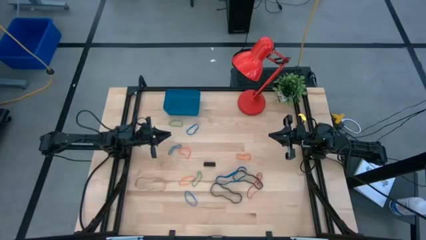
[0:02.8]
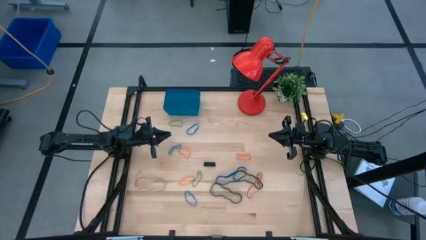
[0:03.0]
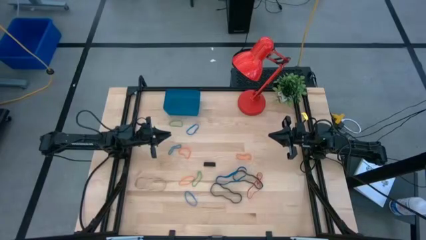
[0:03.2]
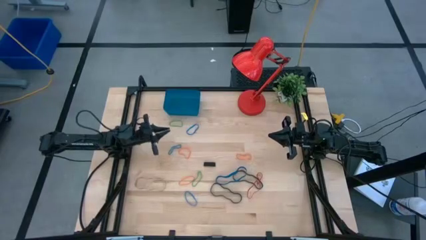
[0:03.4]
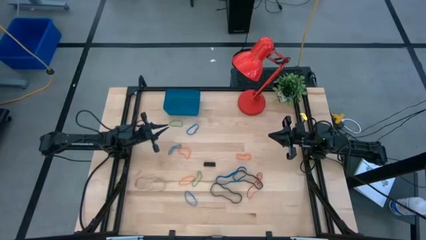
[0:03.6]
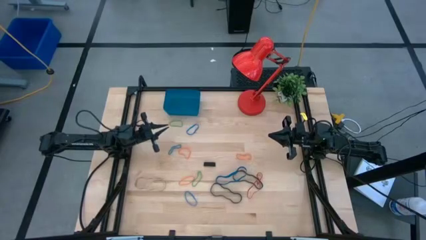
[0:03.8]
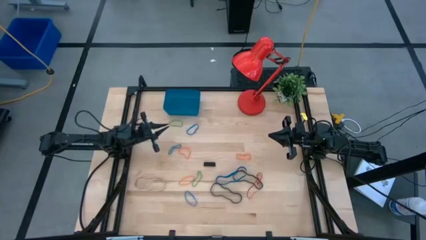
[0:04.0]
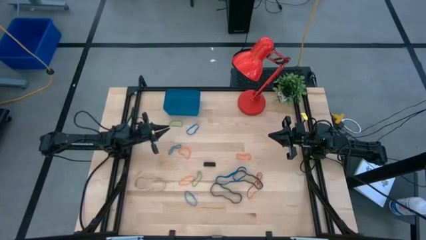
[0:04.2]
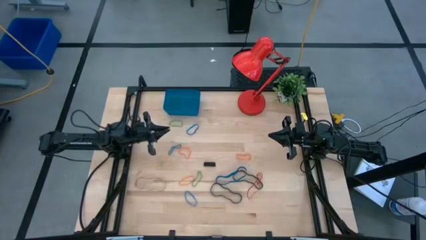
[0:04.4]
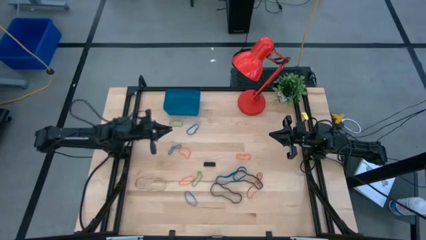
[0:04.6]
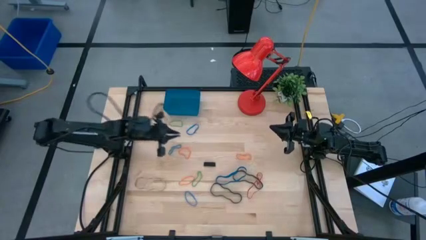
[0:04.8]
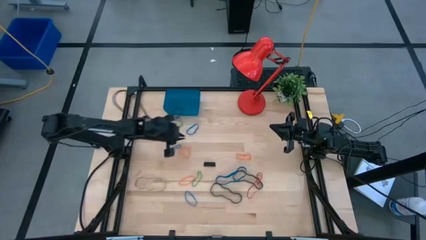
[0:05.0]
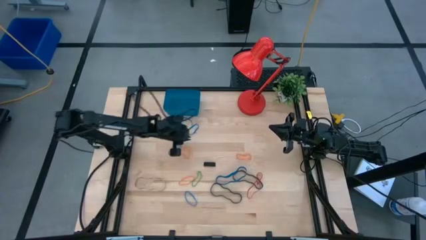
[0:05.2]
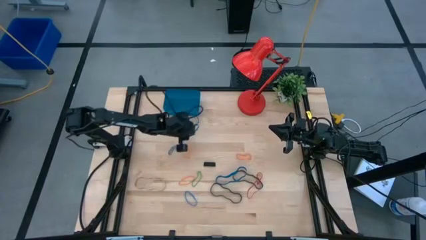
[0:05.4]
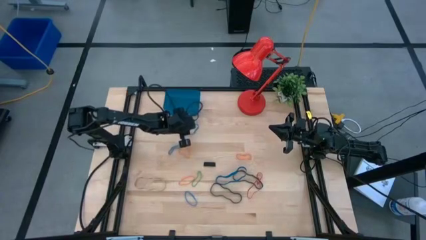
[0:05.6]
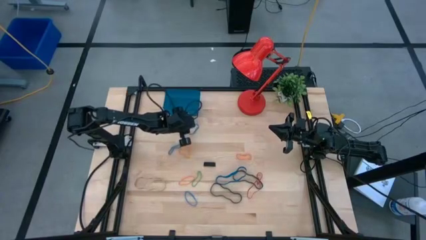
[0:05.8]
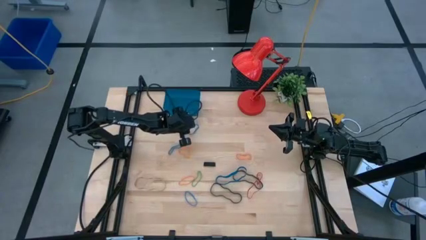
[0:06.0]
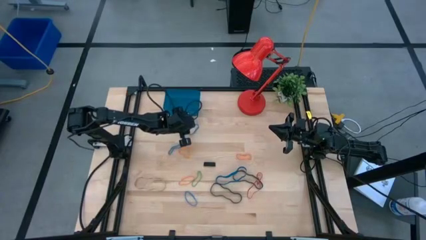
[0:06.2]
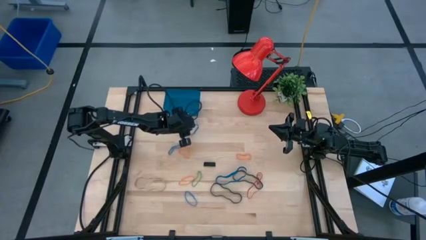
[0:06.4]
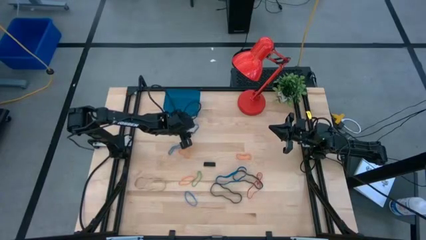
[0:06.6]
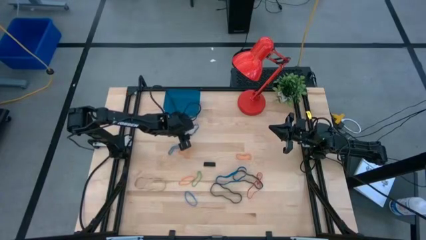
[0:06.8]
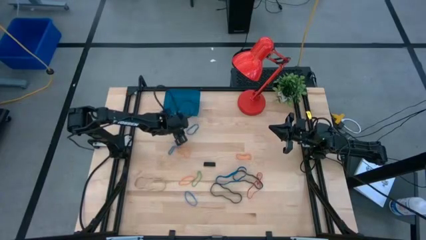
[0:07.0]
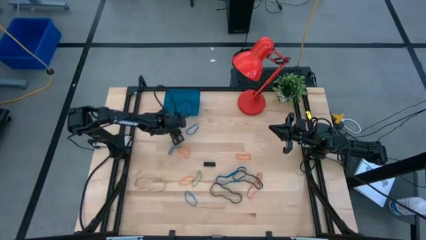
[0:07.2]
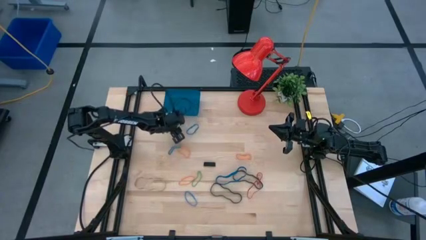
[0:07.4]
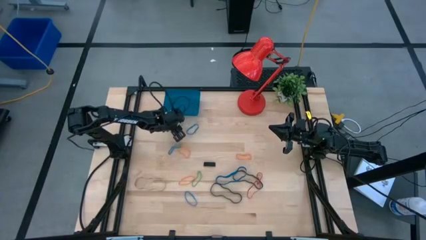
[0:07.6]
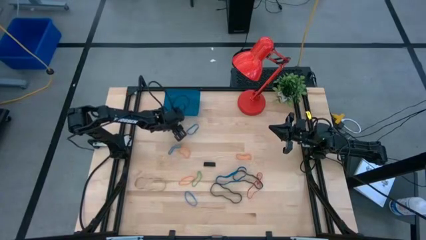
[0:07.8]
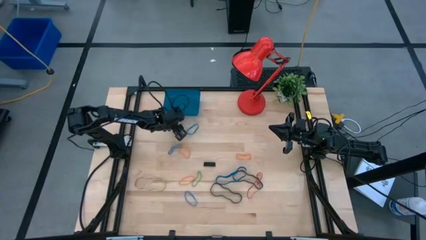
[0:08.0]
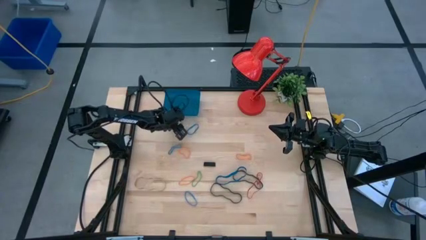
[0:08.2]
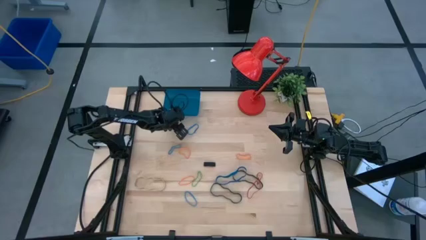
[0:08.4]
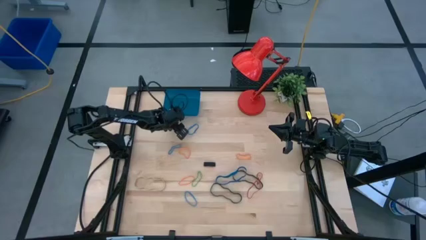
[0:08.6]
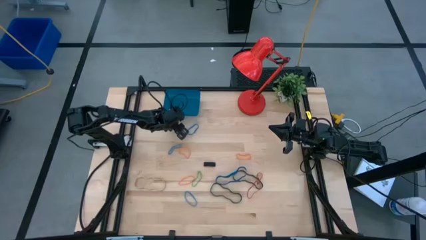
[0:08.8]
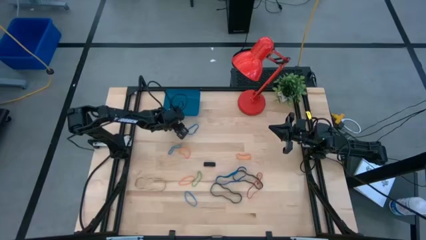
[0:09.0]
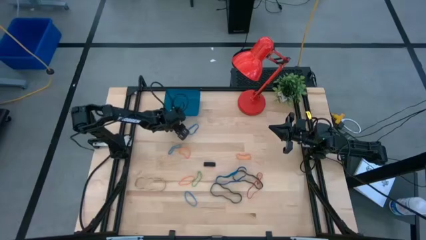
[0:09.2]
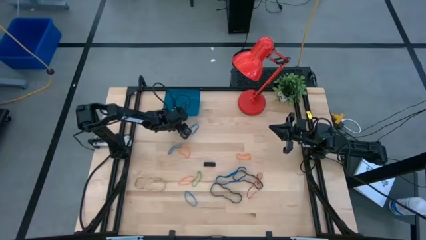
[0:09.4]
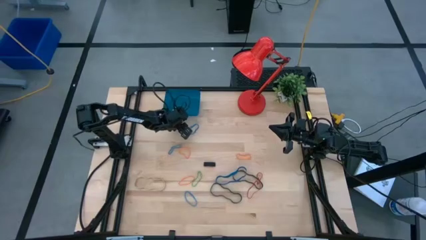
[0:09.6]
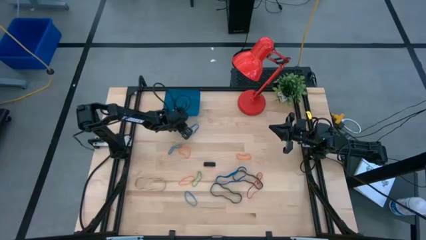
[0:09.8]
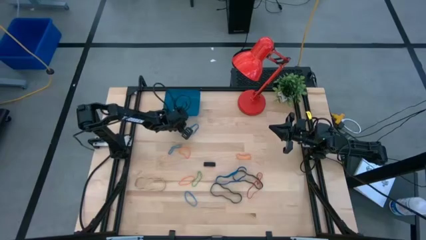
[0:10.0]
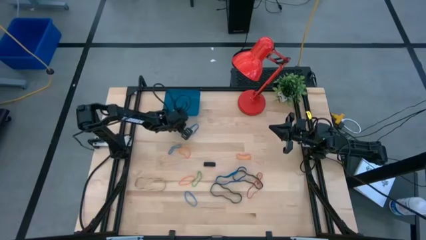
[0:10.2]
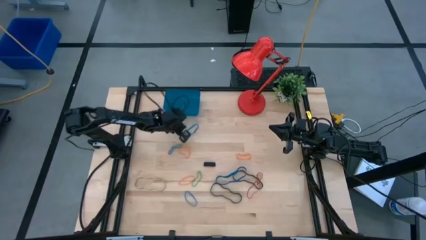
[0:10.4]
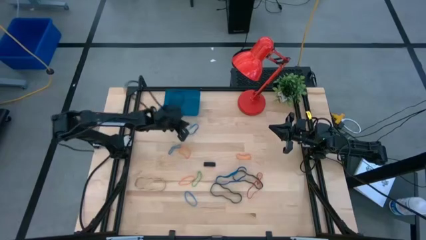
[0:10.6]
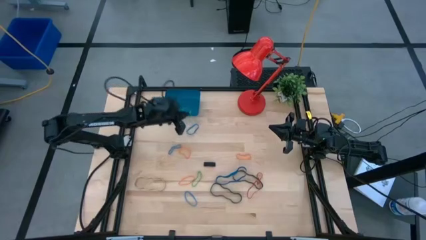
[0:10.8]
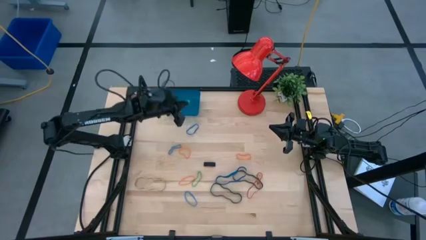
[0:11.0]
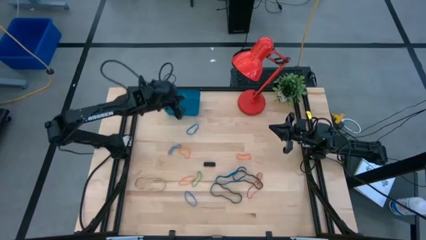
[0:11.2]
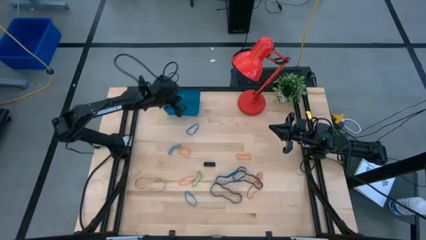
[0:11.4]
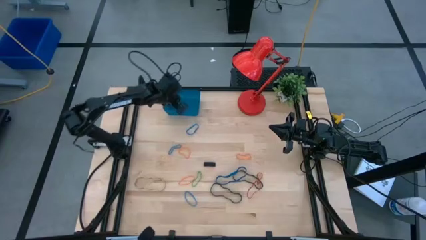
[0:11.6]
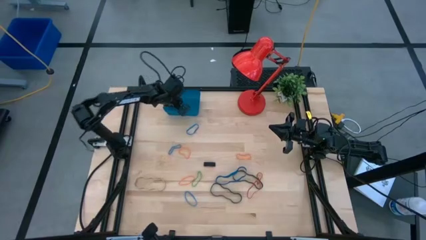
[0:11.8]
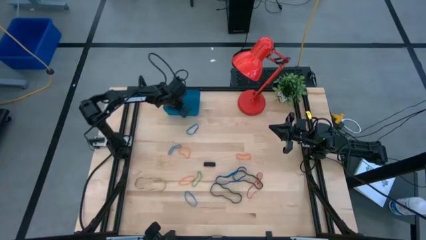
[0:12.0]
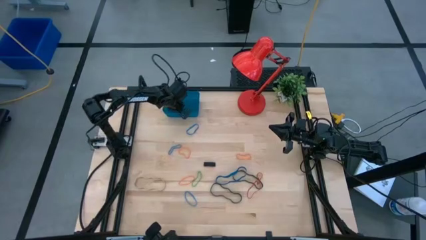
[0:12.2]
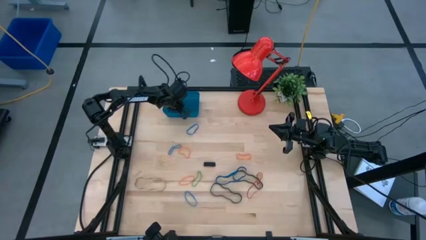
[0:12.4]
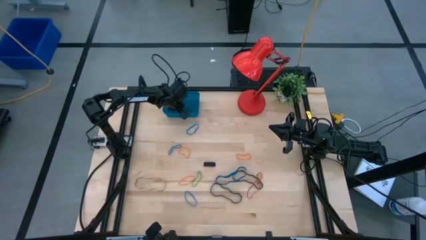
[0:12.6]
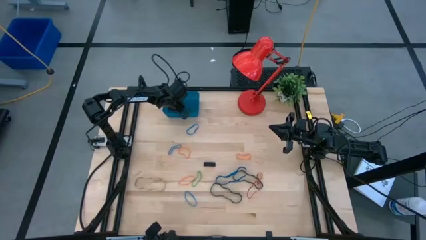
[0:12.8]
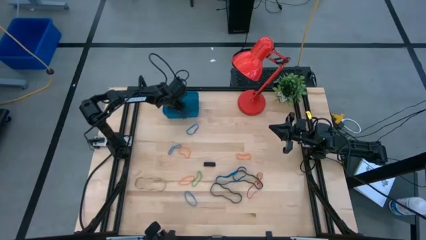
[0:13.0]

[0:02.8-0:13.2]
Task: Pick and place rubber bands into bin
Put the top green rubber band into the blue container

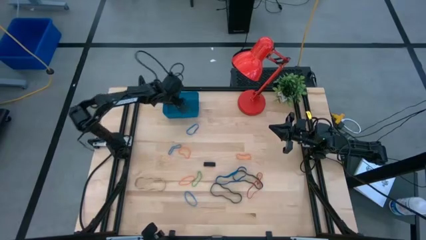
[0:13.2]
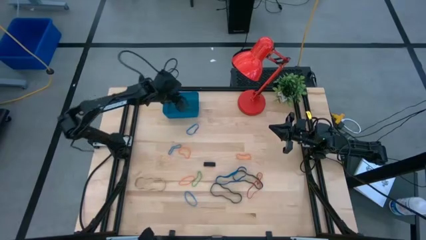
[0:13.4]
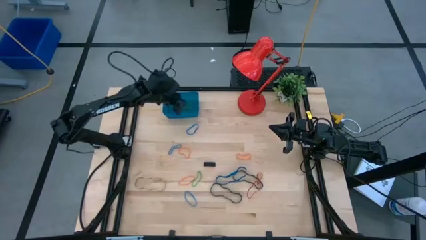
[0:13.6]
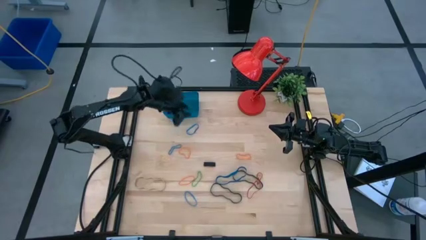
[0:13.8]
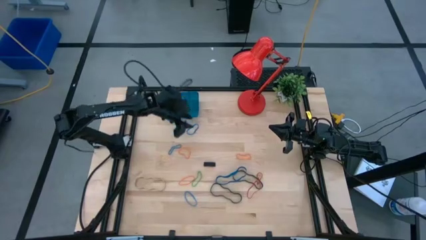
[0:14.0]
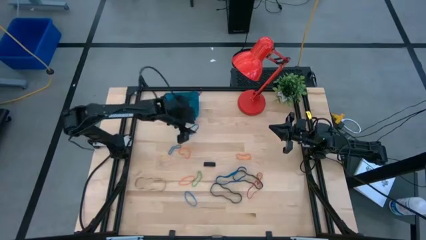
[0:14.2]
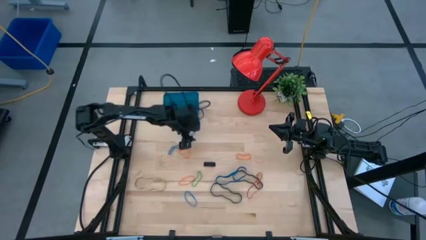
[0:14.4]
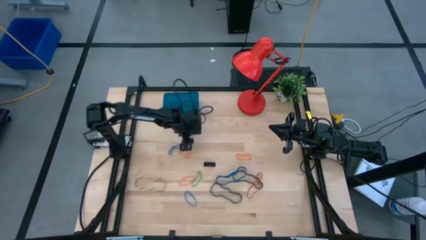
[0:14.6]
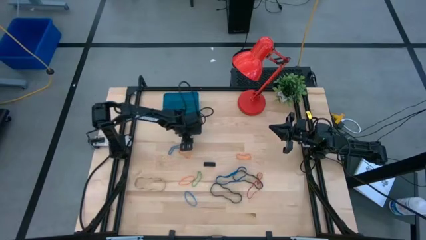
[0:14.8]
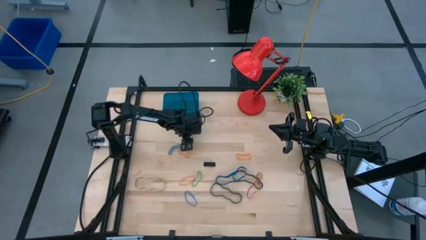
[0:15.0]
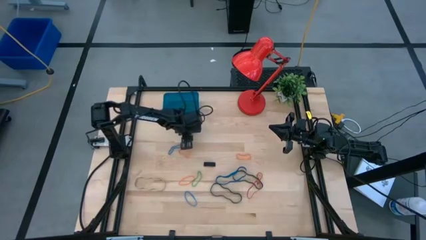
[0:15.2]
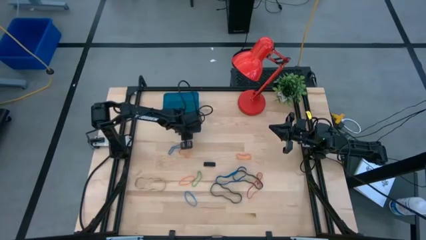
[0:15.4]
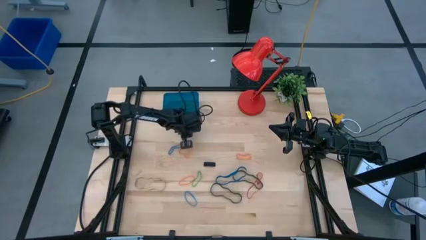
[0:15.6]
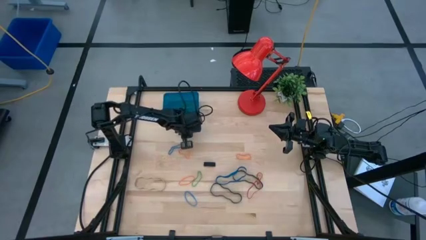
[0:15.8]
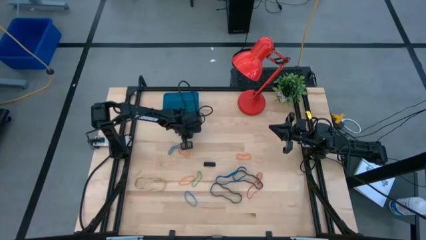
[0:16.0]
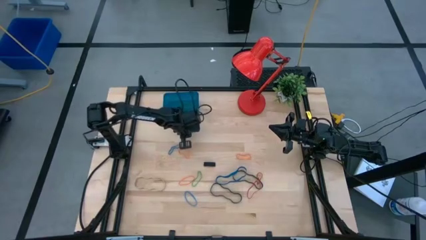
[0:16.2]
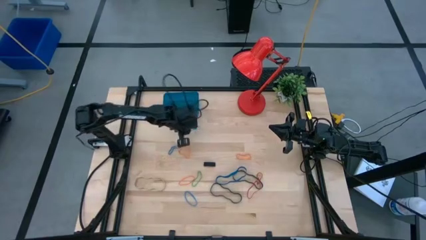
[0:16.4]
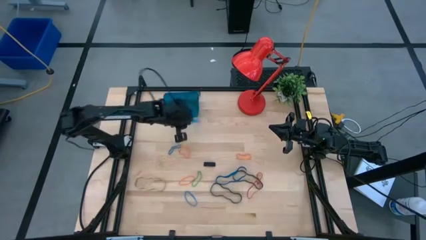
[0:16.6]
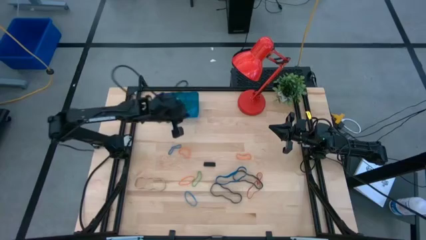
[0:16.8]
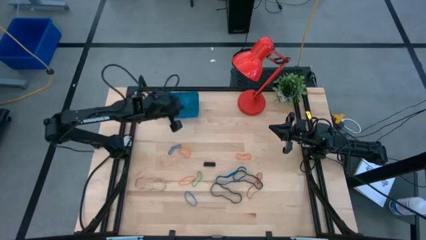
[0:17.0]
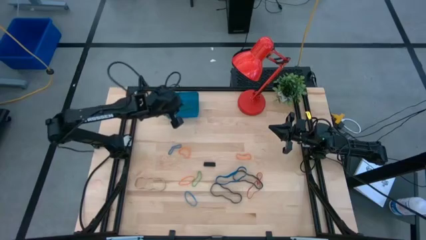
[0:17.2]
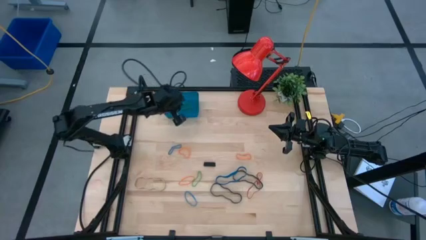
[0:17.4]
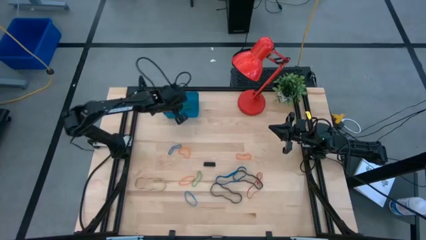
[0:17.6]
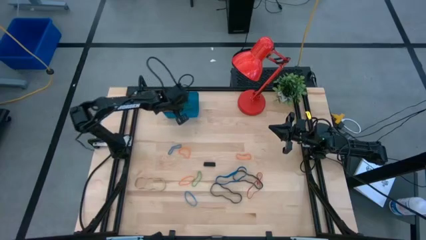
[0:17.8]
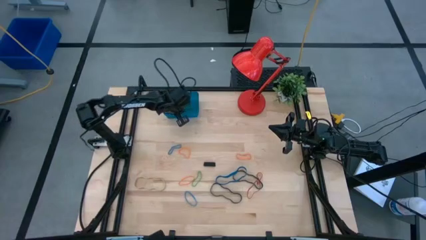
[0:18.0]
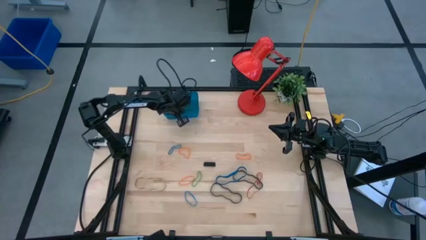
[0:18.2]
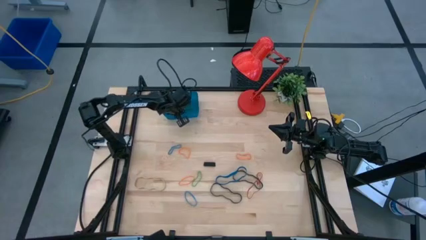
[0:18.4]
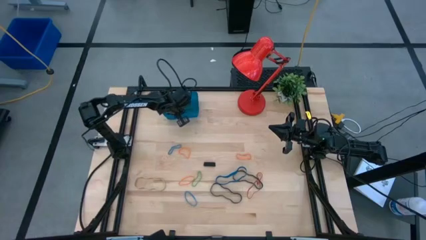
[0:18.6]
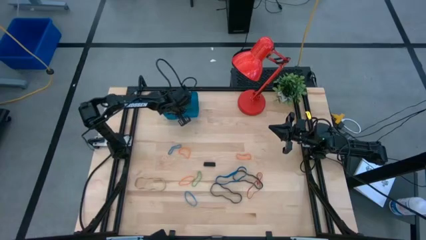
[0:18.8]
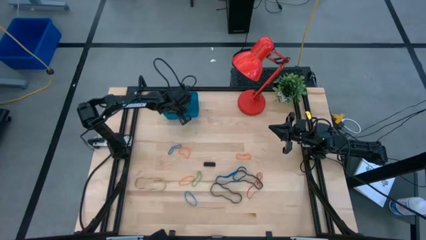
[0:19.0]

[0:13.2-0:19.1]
Put the blue rubber band into the blue container
